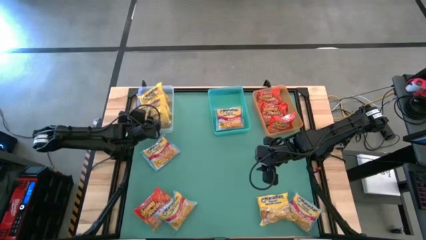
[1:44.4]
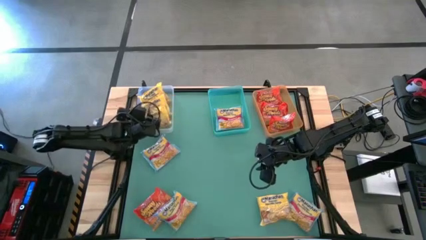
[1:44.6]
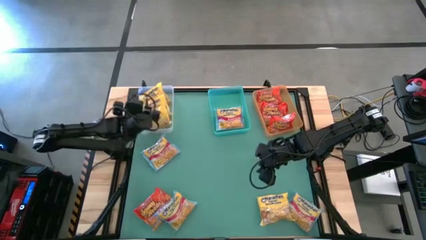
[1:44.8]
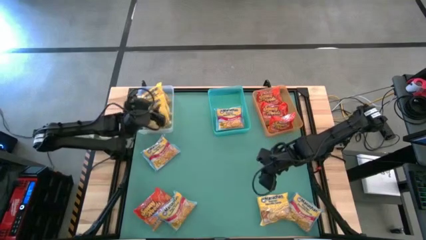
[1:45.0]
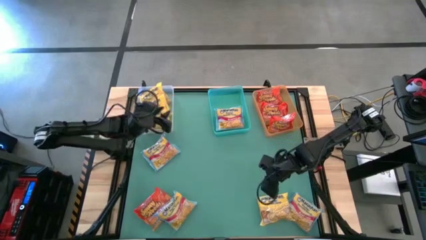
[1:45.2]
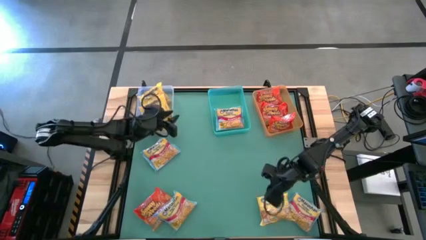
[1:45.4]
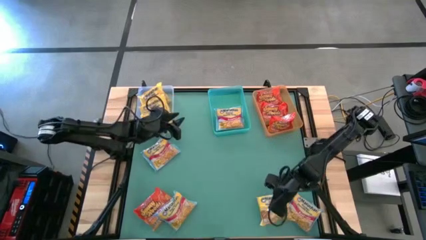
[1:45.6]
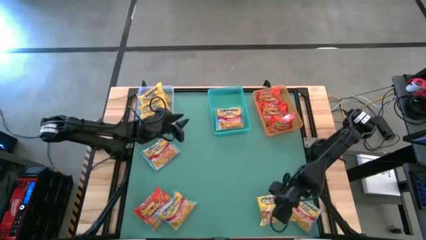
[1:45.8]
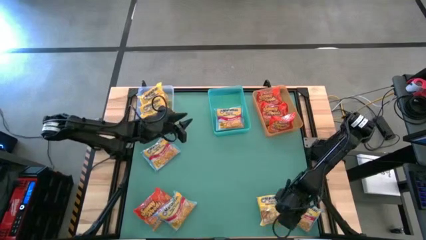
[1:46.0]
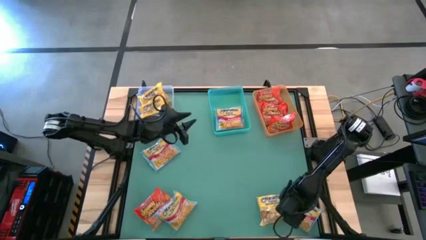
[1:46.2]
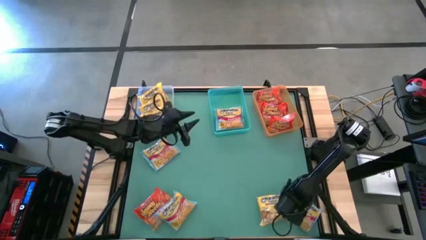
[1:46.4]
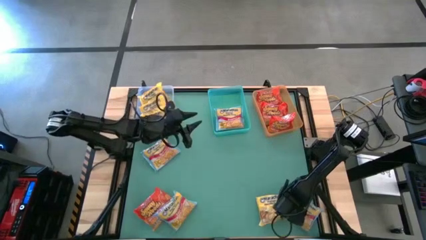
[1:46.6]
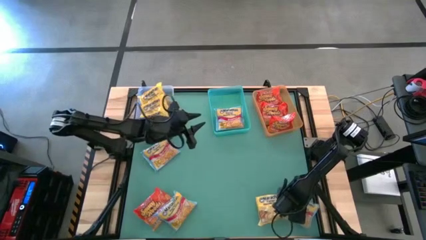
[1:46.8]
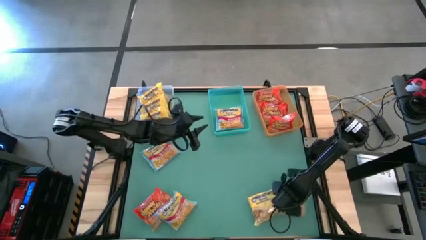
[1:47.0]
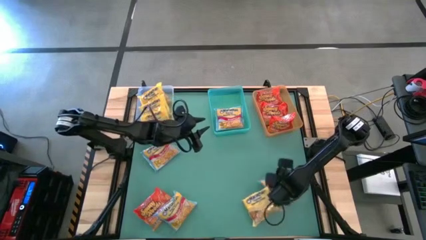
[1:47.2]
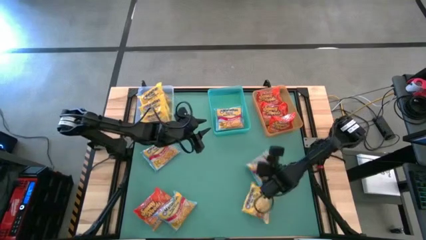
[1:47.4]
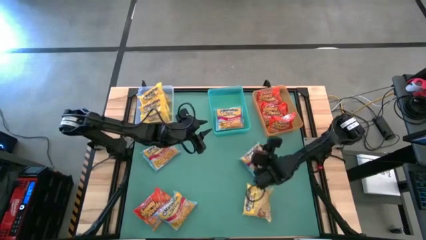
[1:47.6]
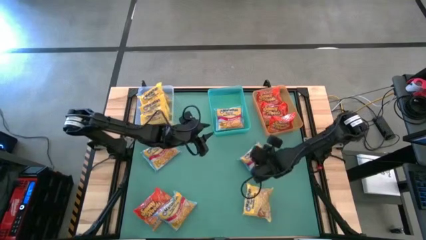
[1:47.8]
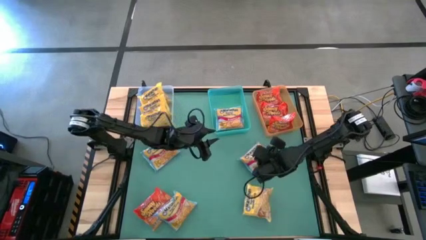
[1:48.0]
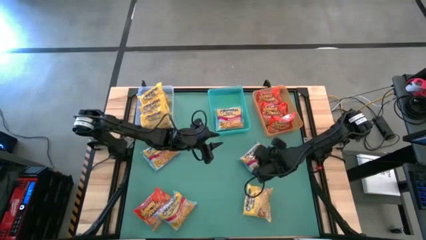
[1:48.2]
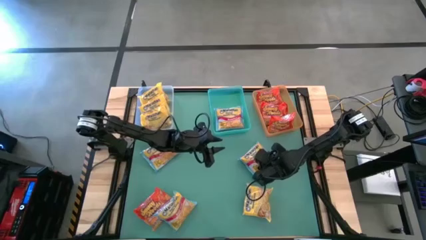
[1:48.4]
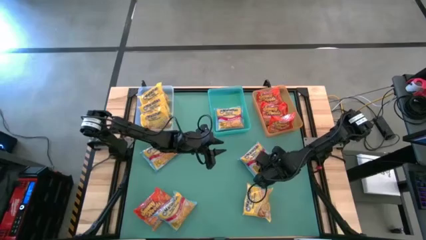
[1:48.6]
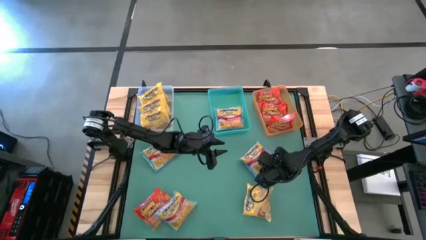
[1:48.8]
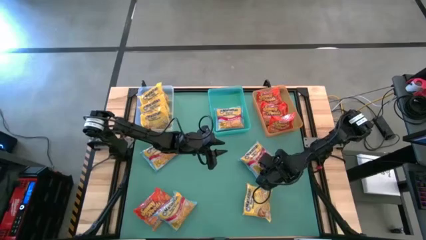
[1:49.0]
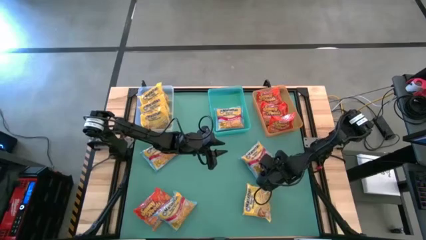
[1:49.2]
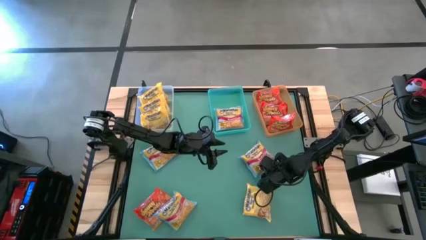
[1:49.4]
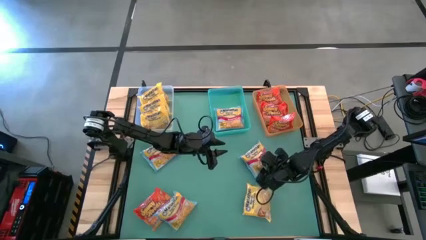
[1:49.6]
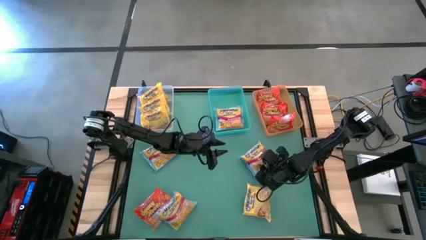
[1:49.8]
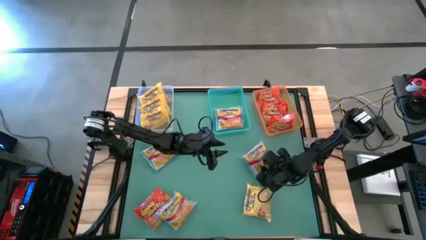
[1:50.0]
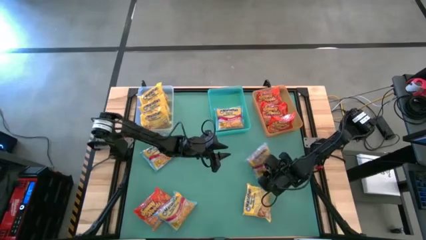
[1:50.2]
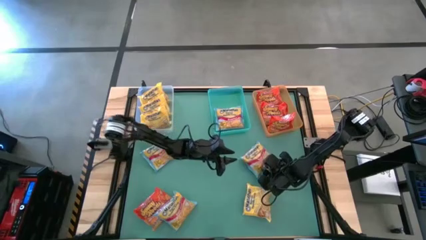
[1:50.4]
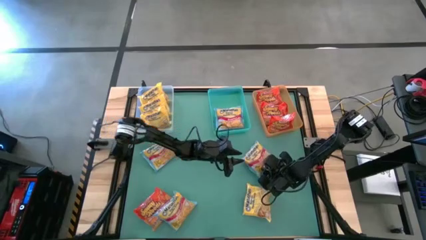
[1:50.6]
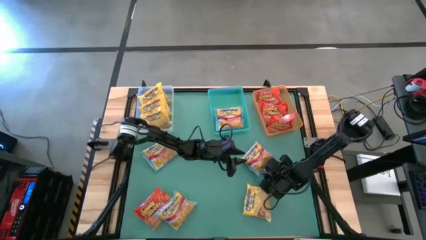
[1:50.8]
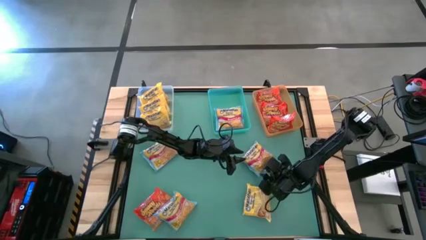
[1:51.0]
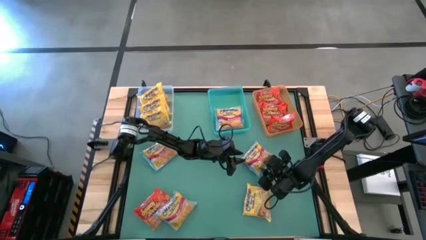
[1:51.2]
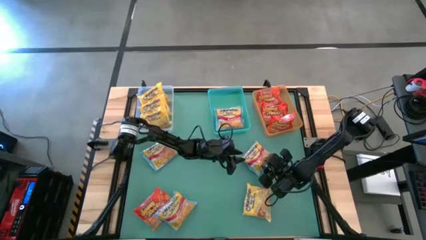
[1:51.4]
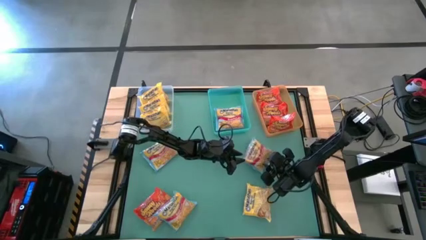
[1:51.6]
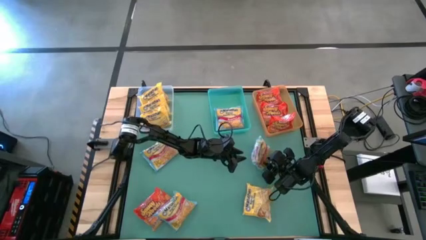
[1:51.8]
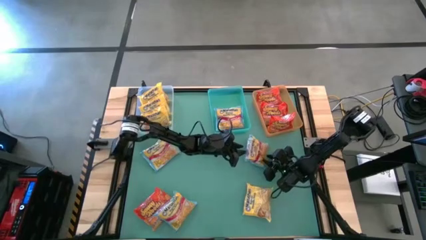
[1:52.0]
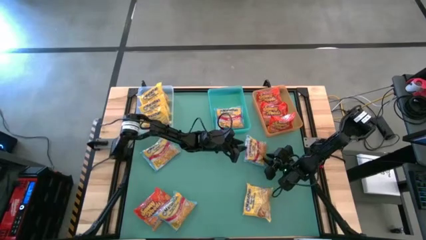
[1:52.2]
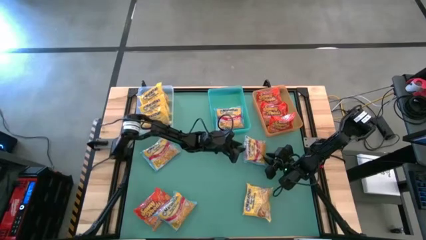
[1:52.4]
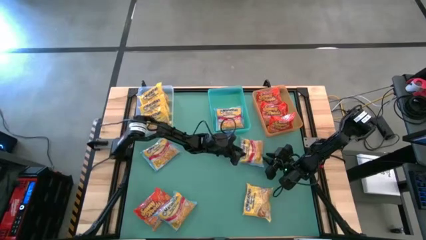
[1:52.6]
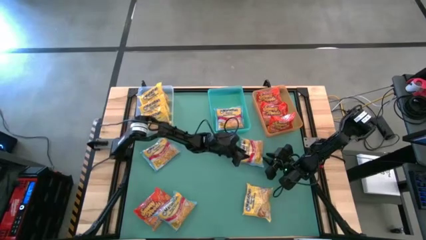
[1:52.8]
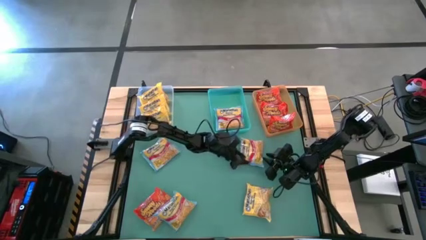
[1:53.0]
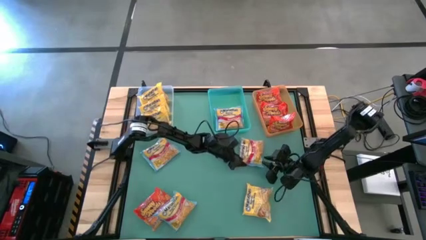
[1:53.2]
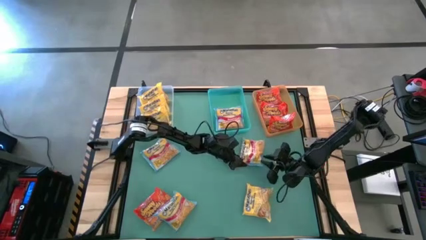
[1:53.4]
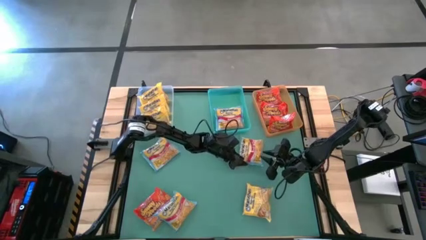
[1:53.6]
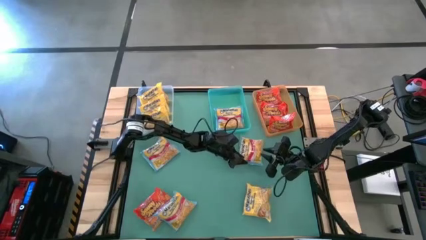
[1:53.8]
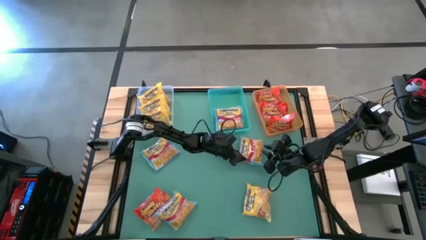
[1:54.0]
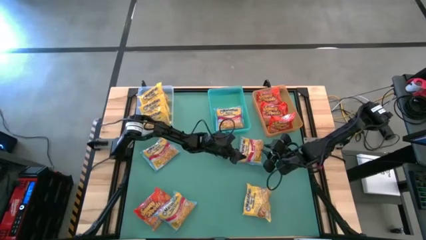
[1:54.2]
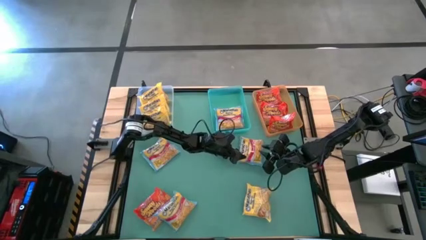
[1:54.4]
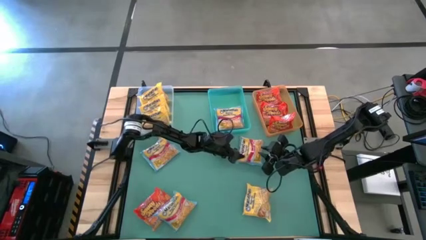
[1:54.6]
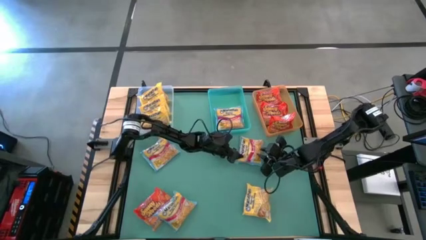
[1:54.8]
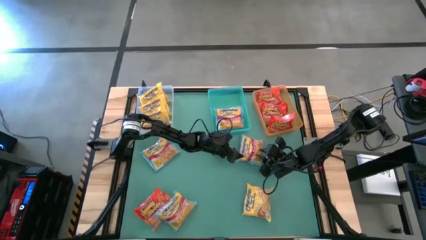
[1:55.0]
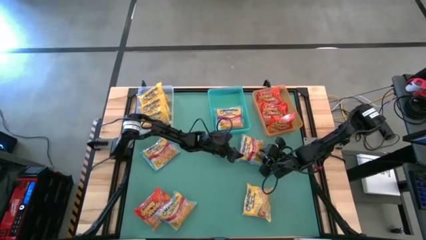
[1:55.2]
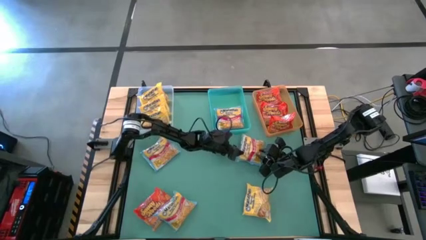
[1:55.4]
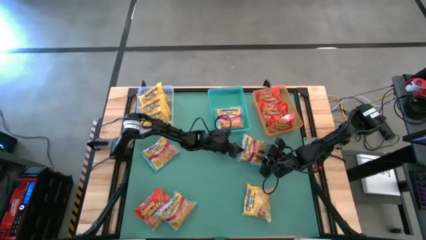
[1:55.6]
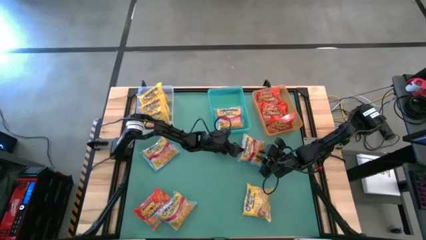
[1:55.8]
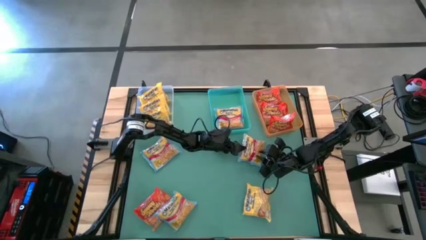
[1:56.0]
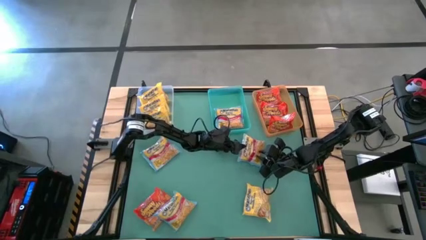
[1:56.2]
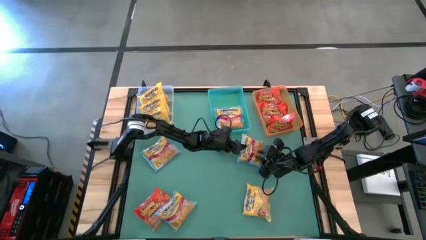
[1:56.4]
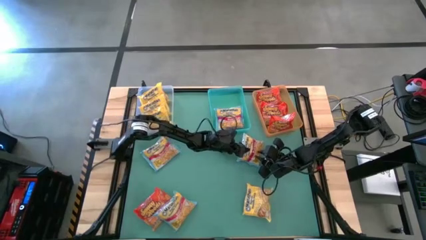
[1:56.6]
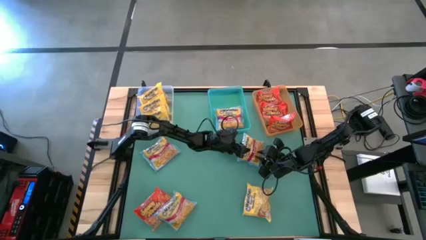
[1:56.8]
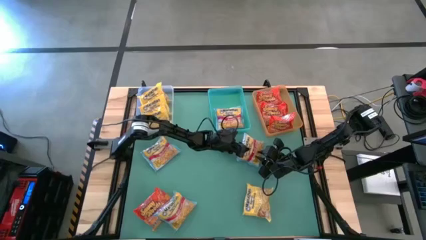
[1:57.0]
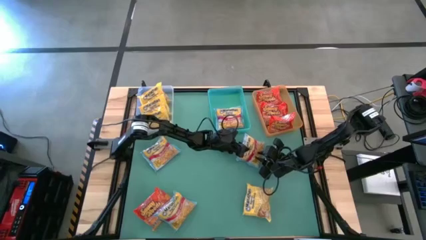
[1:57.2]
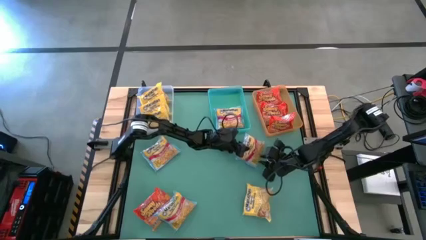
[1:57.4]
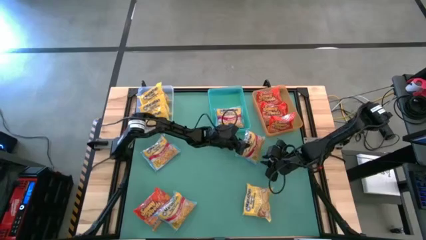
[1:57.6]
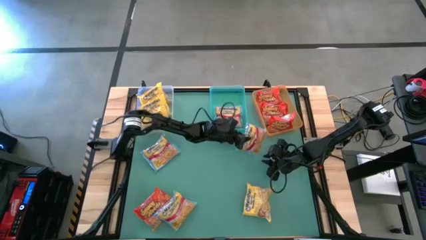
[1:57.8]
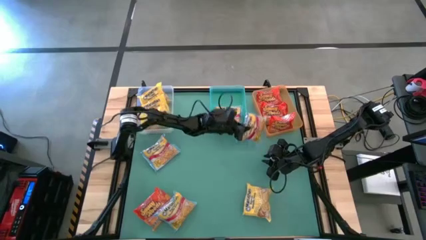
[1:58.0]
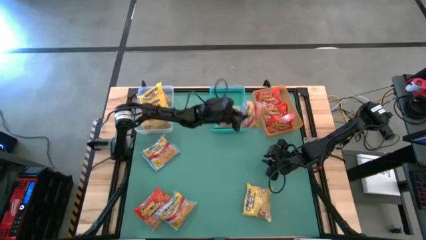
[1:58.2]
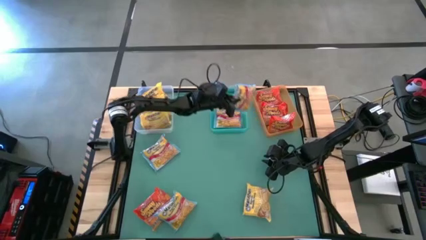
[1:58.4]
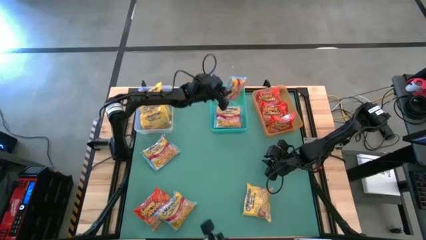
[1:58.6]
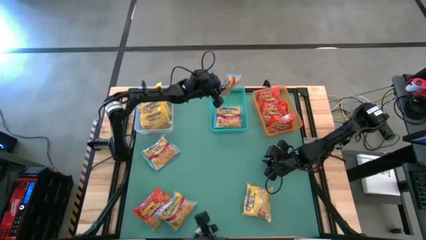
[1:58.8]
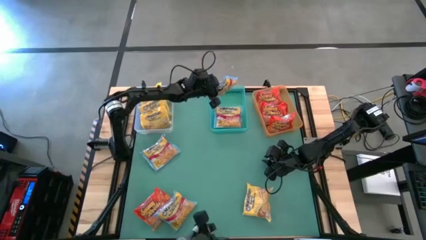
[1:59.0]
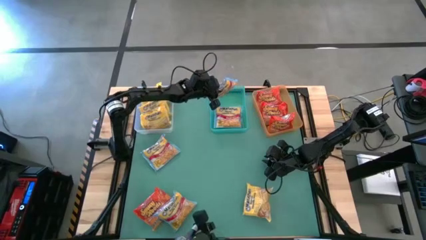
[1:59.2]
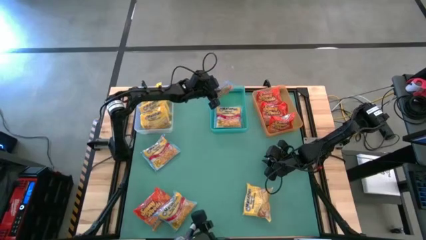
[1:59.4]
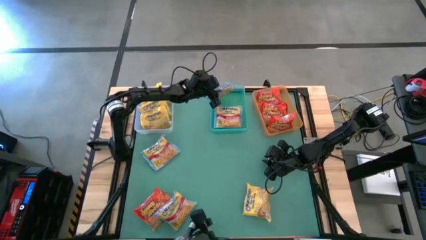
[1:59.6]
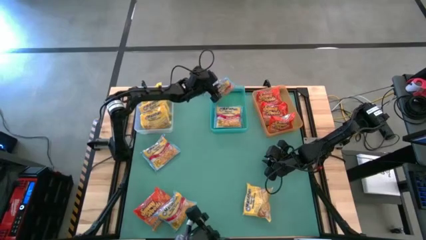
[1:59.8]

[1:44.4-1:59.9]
Task: Sort Maruchan noodles
Put the blue noodle pack into the green bin
